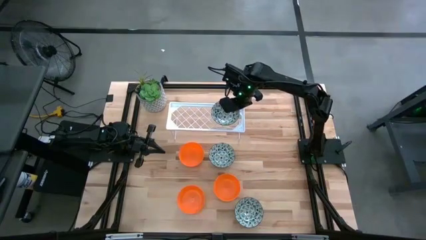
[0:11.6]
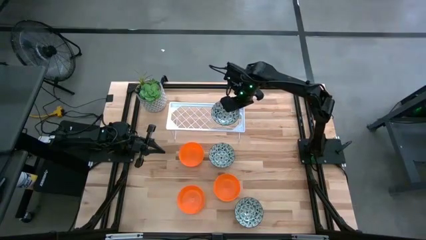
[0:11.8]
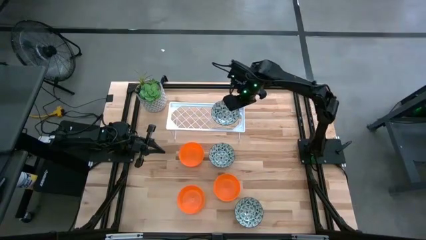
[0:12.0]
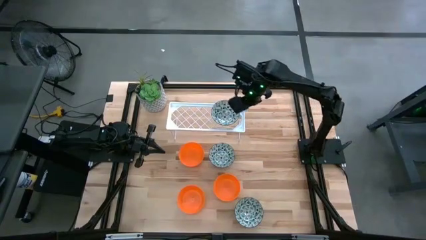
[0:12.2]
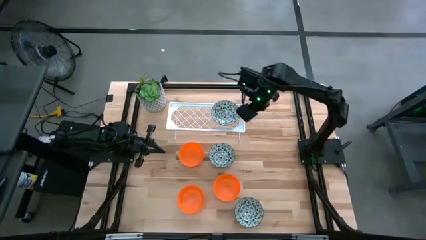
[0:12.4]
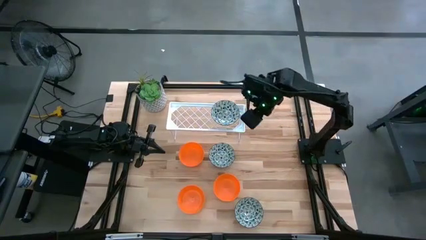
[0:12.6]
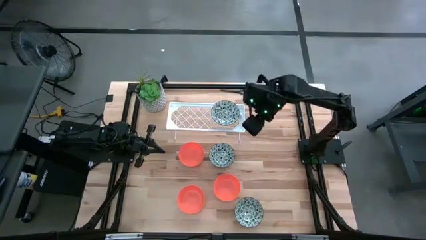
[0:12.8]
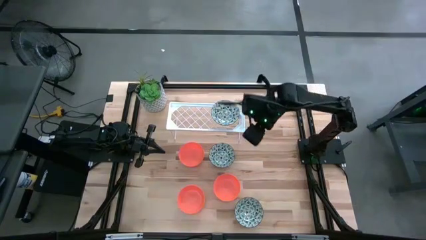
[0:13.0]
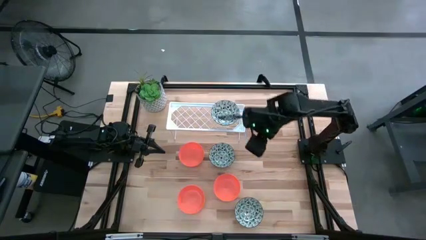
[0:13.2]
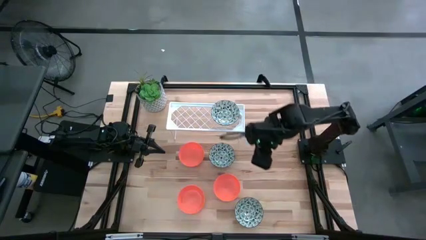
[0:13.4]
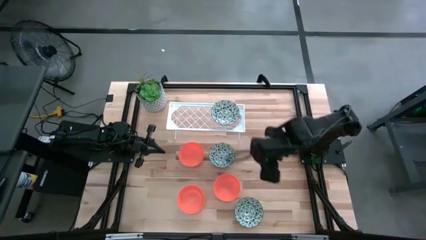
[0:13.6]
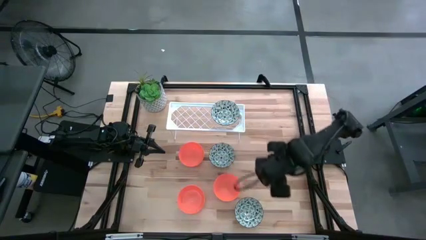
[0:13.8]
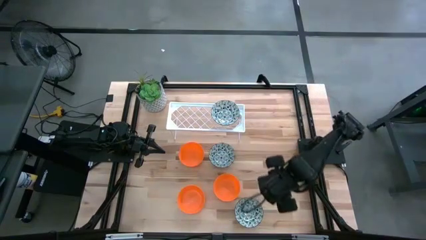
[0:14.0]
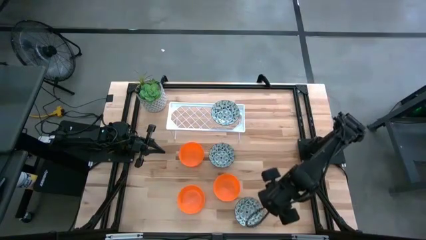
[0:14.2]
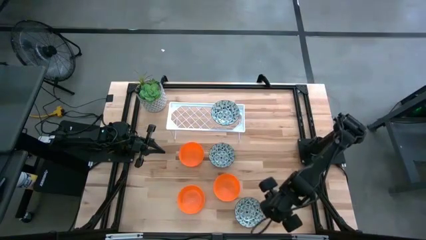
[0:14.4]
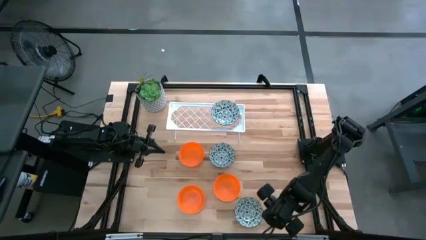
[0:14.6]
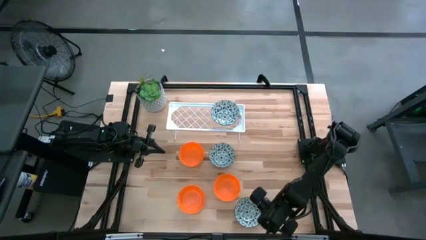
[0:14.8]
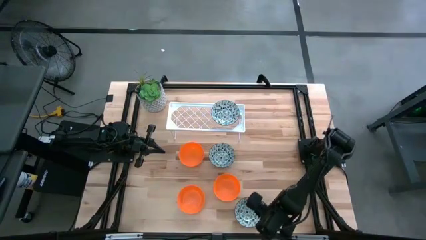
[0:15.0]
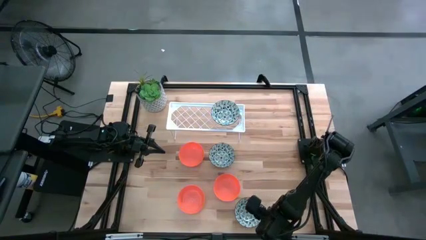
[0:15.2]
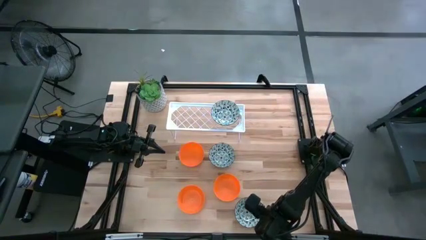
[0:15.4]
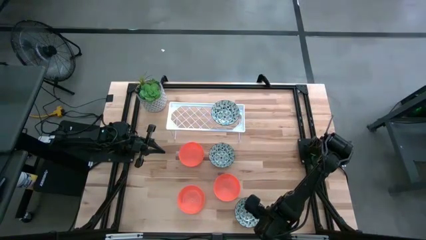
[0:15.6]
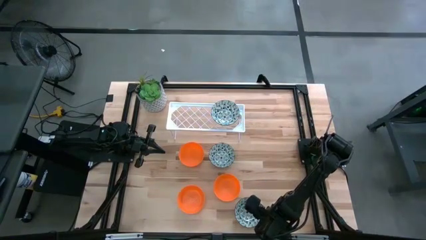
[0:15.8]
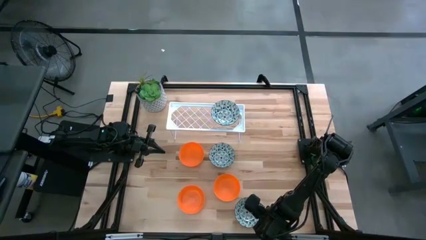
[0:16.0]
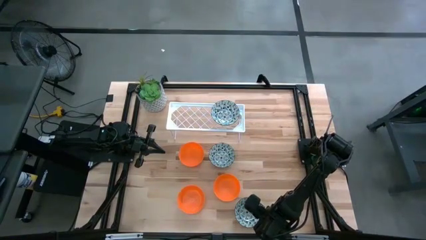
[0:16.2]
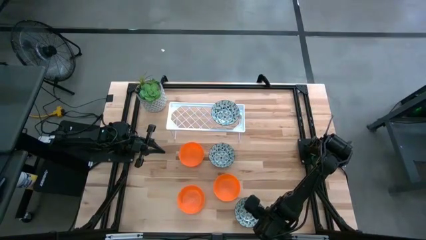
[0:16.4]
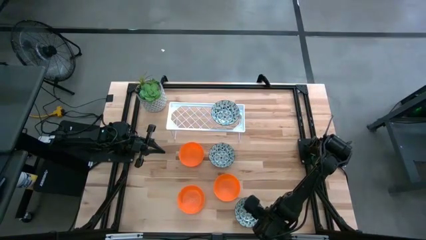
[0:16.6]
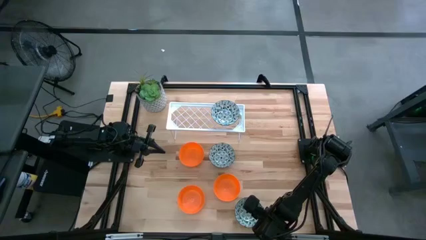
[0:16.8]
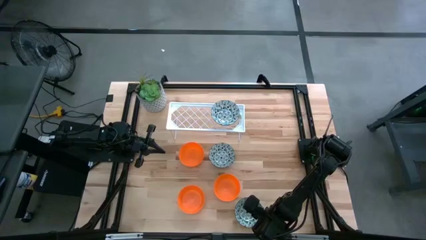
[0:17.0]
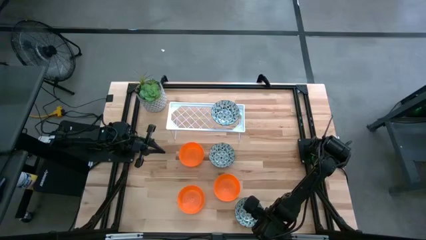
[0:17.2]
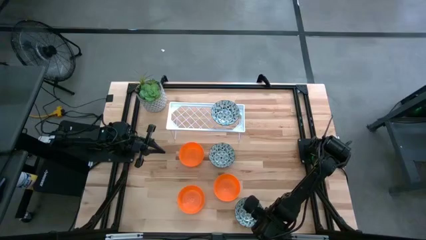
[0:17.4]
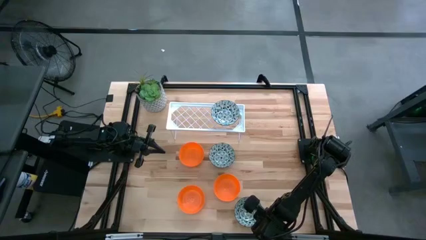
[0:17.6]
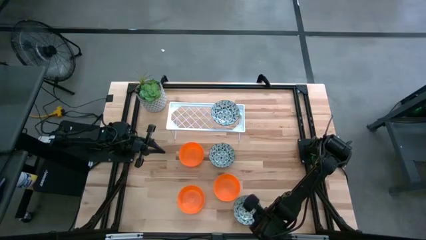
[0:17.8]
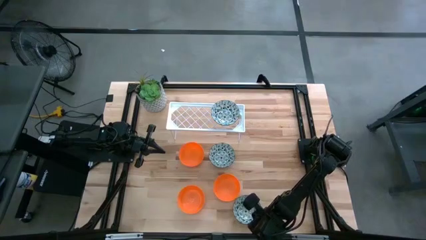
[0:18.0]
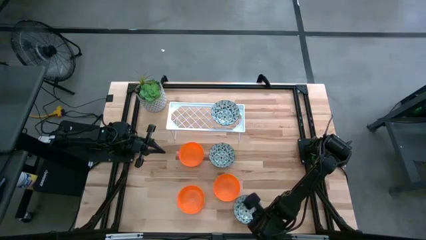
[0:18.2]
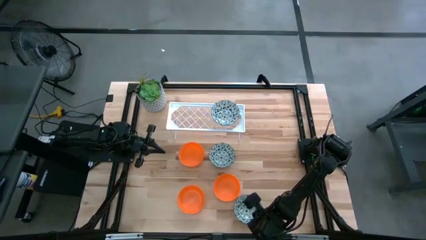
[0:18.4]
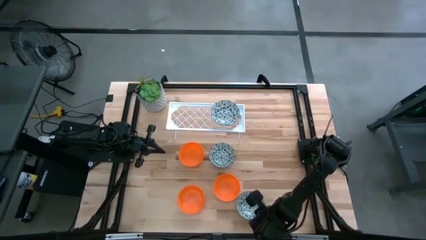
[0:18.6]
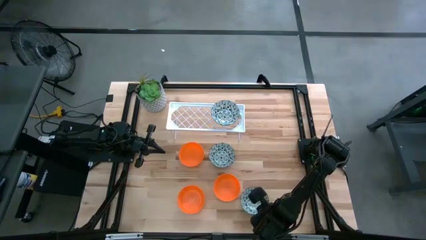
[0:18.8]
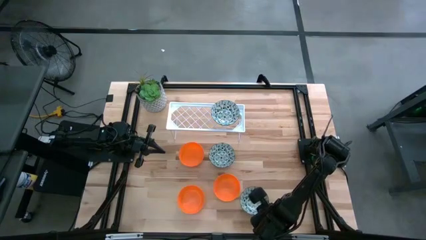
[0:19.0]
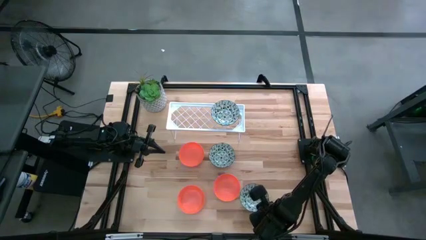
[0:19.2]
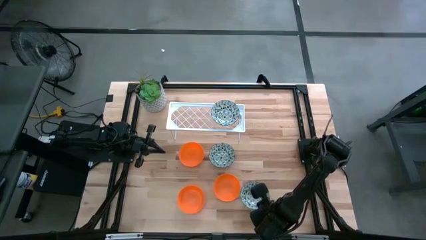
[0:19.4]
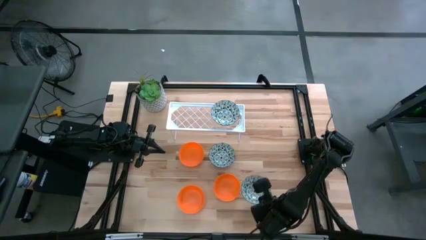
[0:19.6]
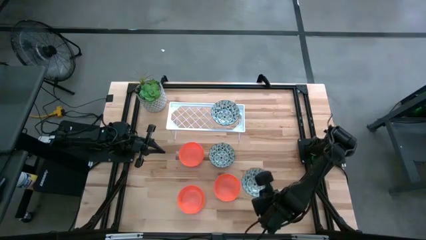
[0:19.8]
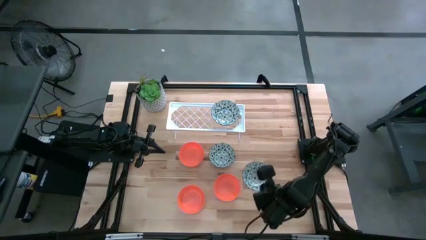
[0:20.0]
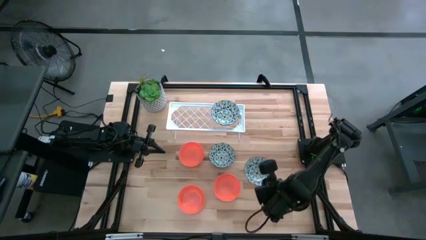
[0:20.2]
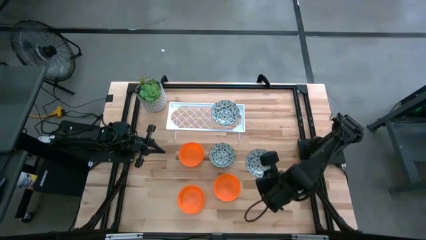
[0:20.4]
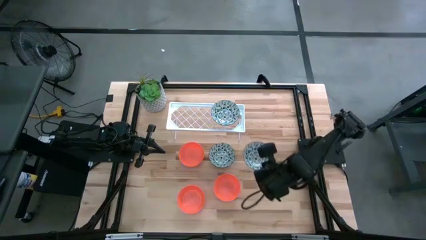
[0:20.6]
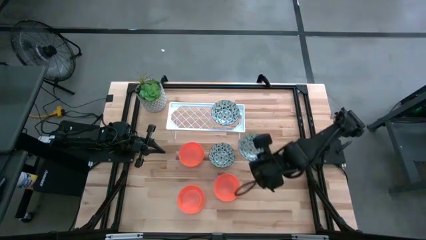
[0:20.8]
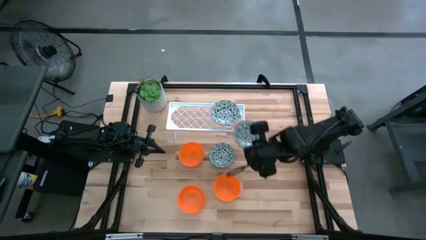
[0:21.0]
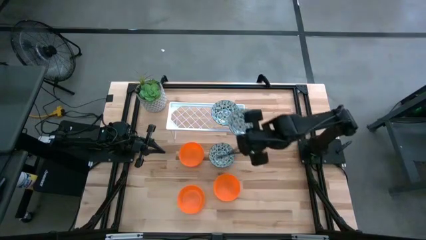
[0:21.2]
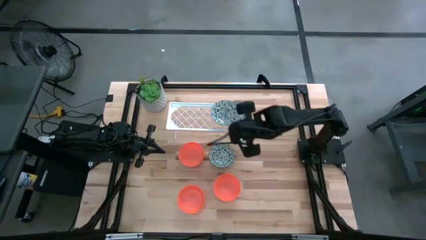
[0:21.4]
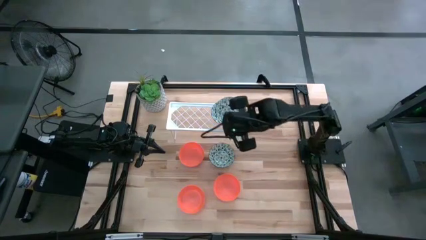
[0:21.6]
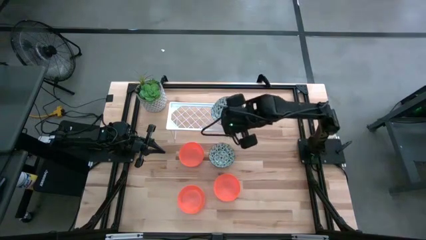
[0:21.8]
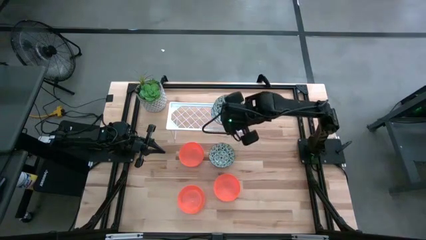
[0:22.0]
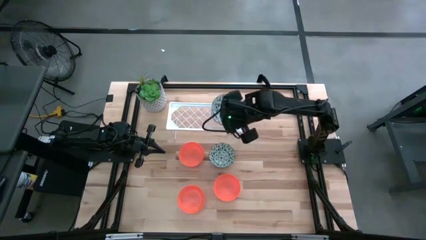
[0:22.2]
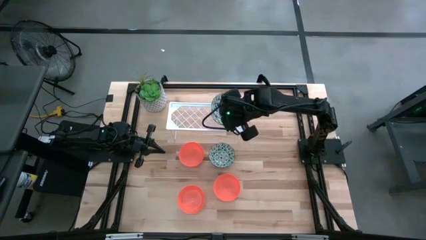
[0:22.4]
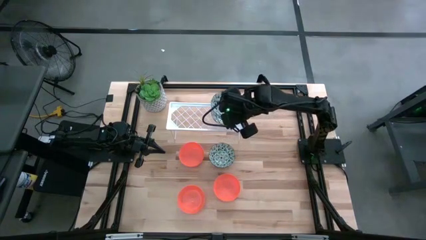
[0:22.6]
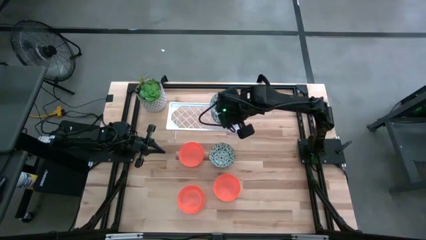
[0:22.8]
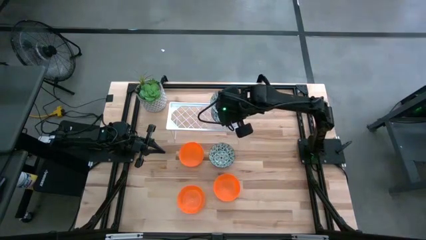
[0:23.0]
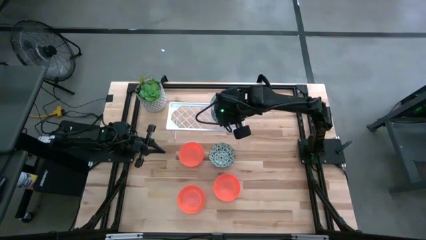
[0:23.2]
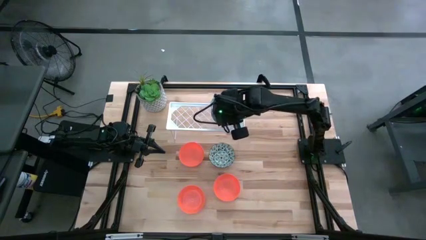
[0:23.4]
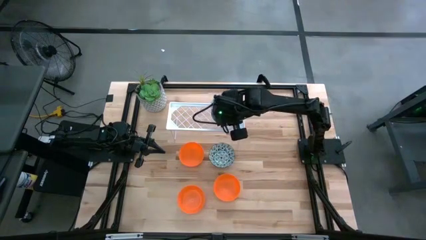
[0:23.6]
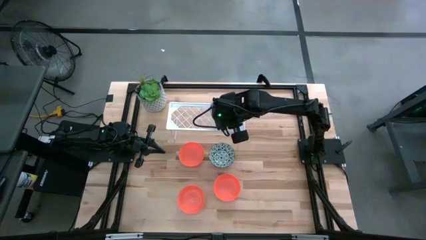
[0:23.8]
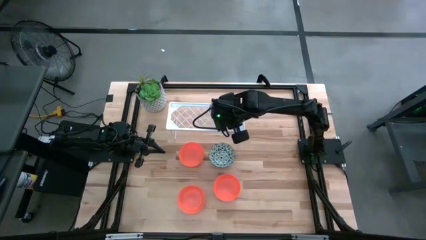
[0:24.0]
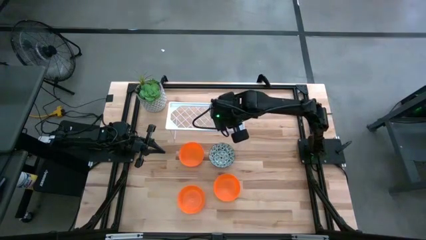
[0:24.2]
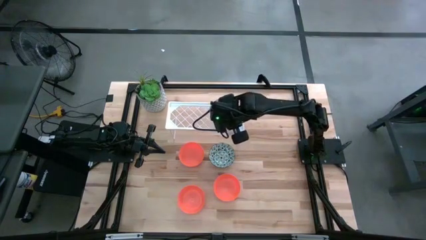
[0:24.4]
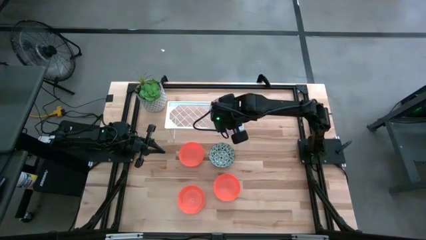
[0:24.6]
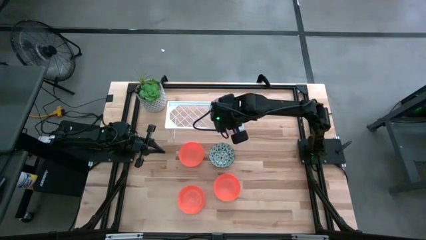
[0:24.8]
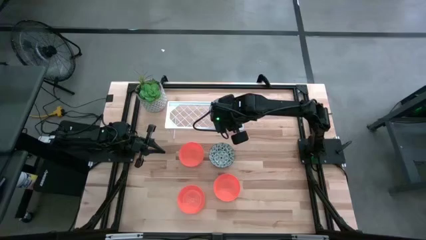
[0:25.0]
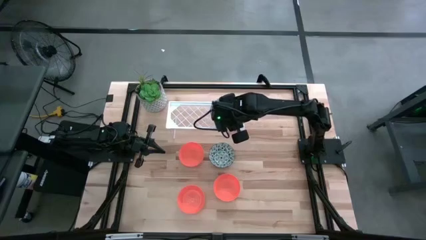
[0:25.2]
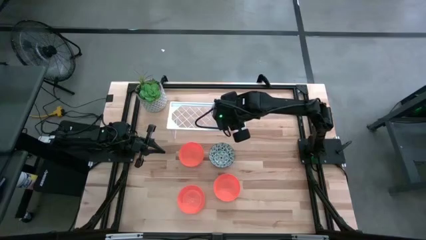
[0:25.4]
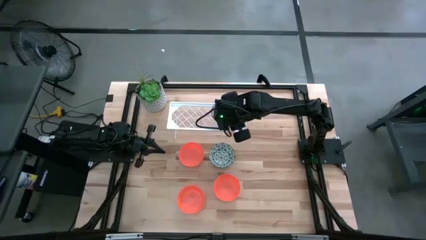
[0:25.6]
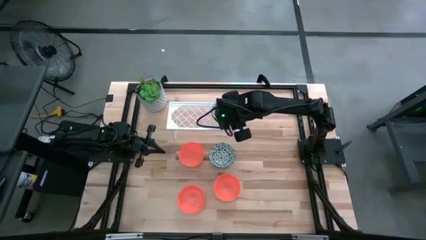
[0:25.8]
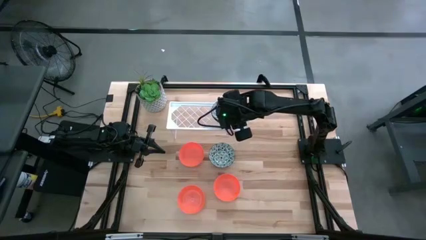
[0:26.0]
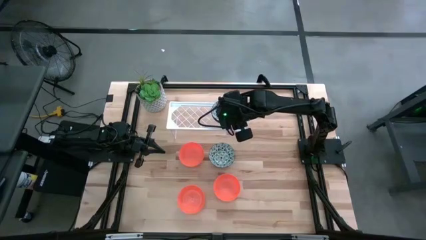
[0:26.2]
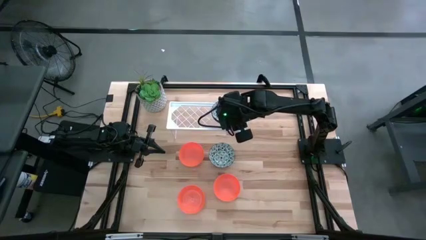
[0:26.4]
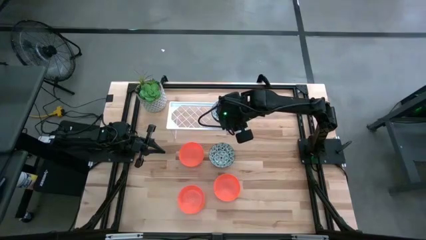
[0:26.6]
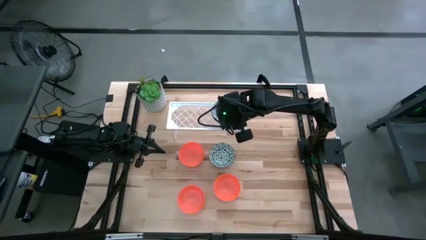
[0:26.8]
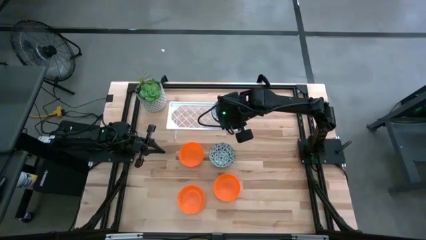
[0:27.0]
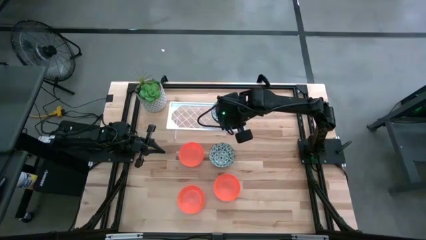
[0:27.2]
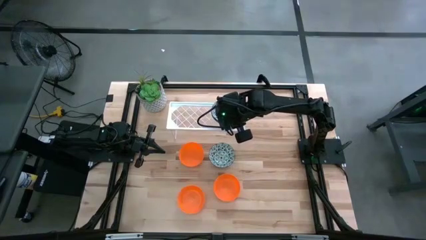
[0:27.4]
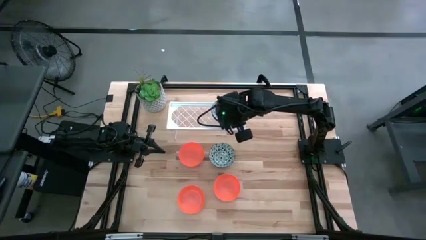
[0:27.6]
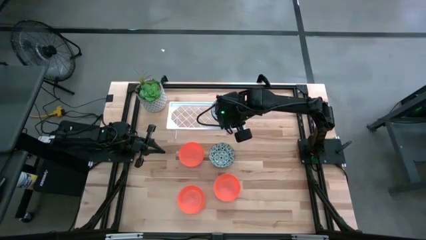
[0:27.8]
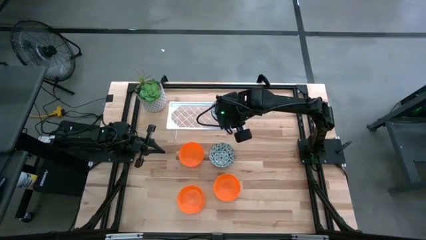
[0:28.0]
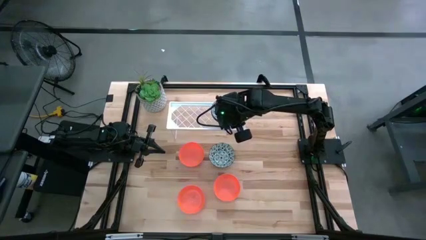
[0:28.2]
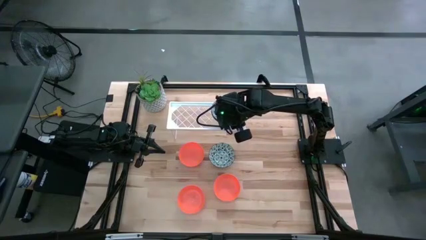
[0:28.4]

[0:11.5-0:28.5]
Task: Pick & Place Mini bowls
Stack the bottom white patterned bowl on the white patterned bowl on the shelf
